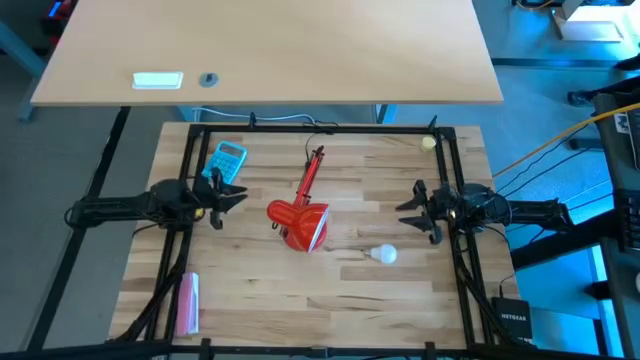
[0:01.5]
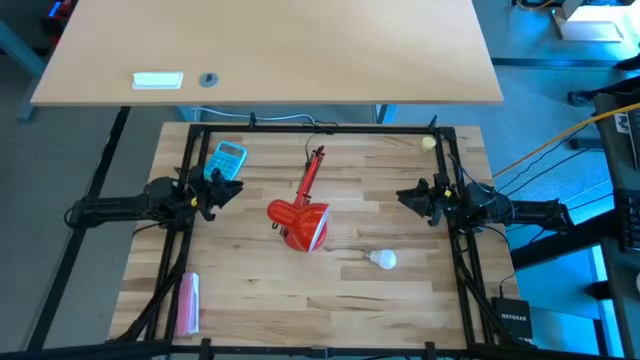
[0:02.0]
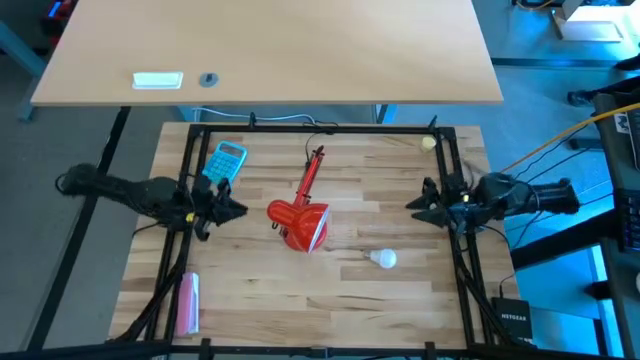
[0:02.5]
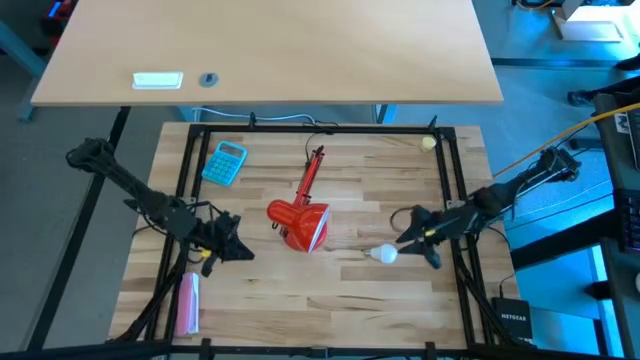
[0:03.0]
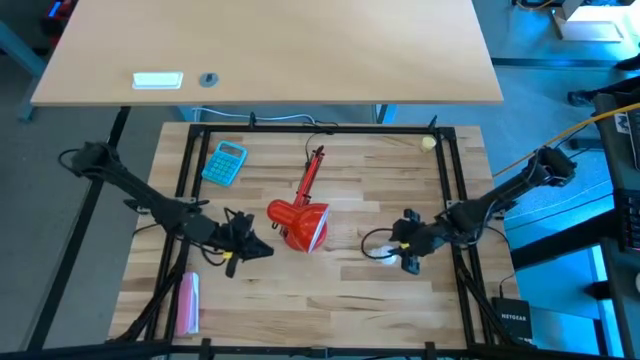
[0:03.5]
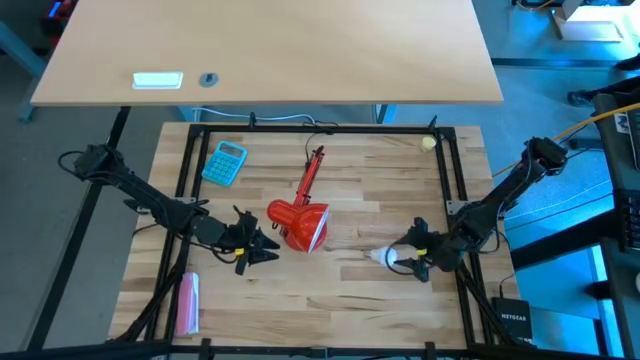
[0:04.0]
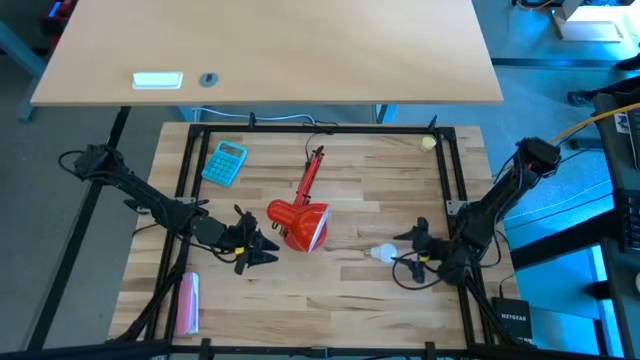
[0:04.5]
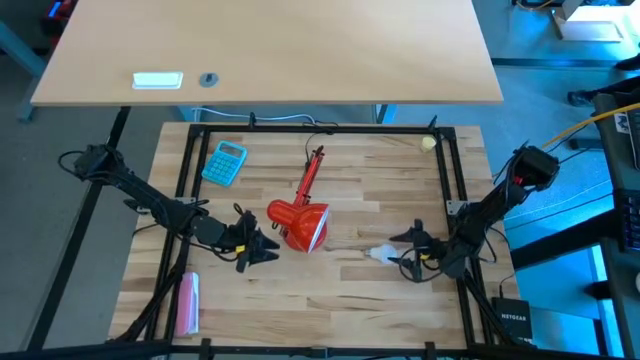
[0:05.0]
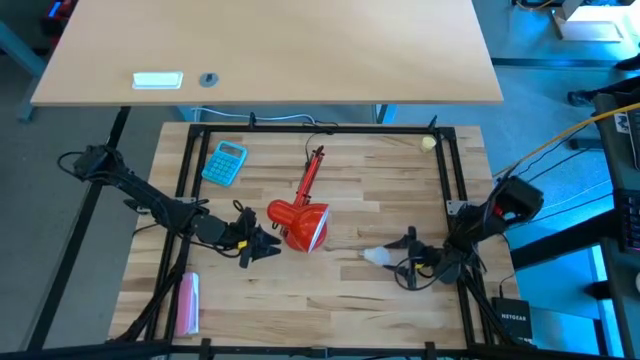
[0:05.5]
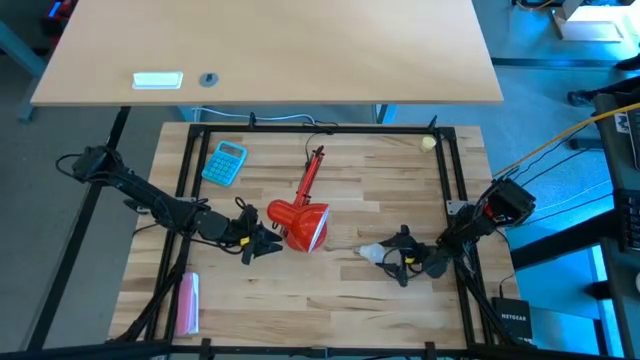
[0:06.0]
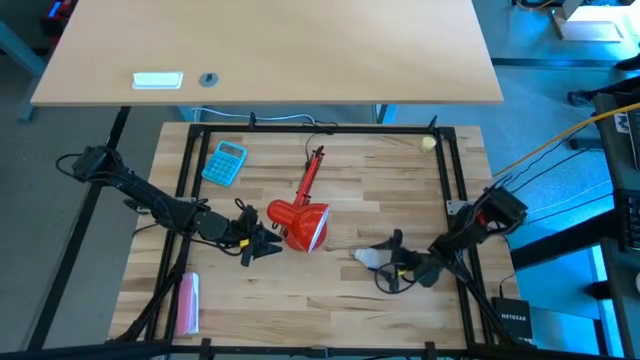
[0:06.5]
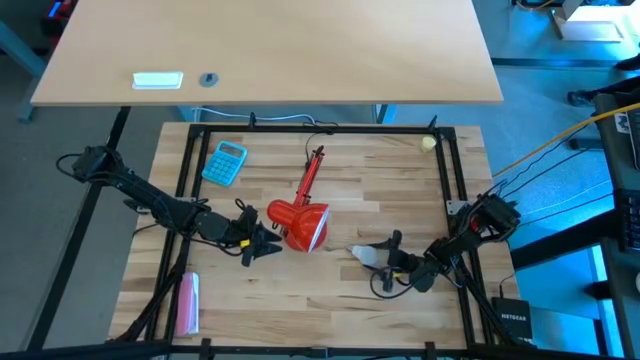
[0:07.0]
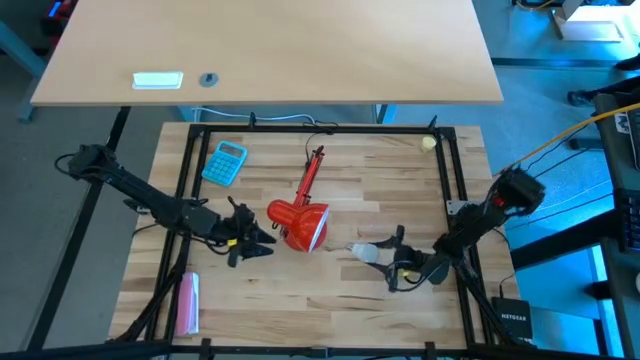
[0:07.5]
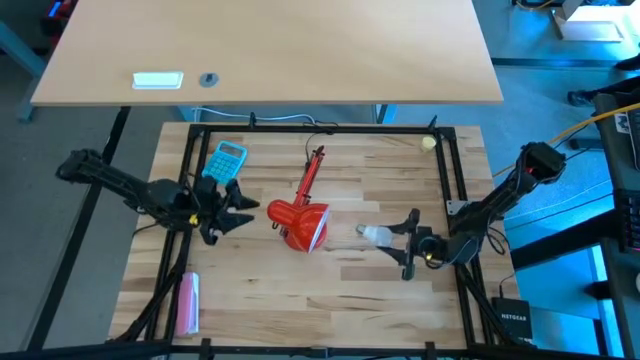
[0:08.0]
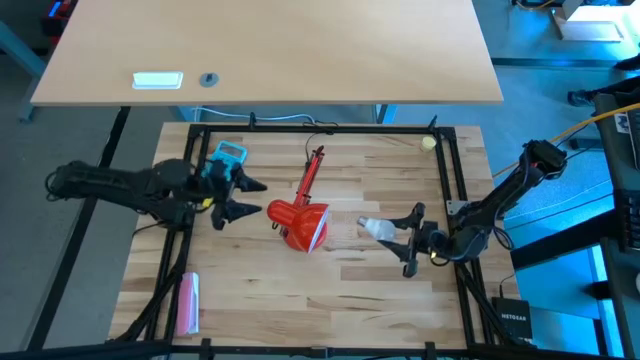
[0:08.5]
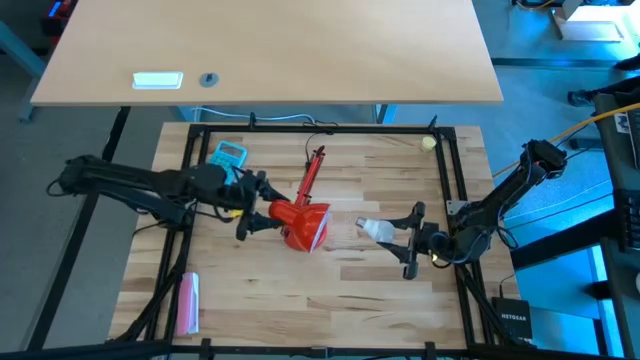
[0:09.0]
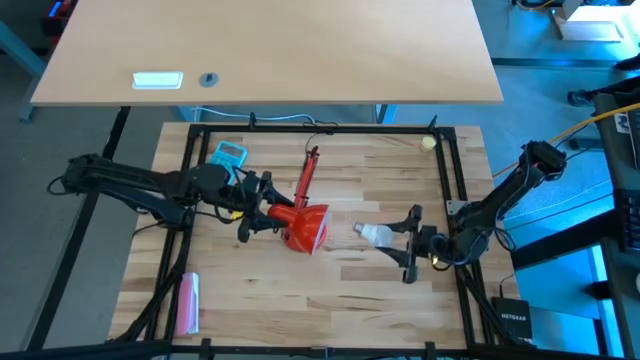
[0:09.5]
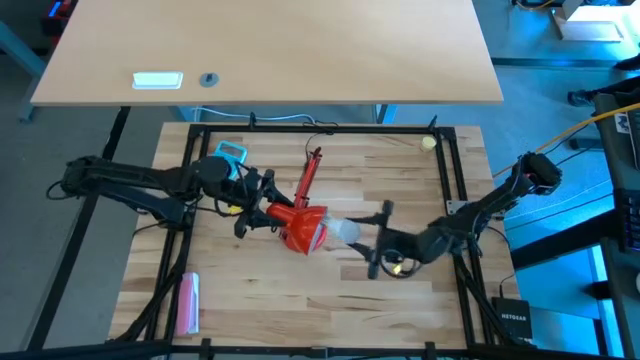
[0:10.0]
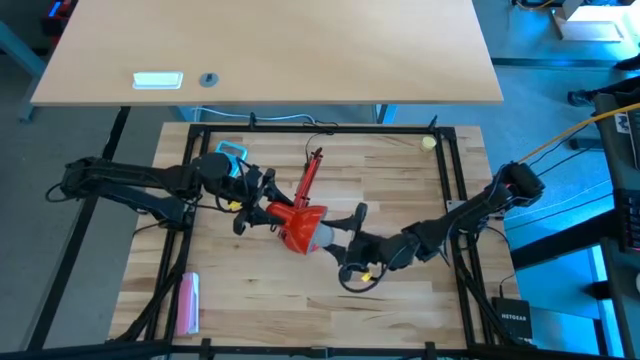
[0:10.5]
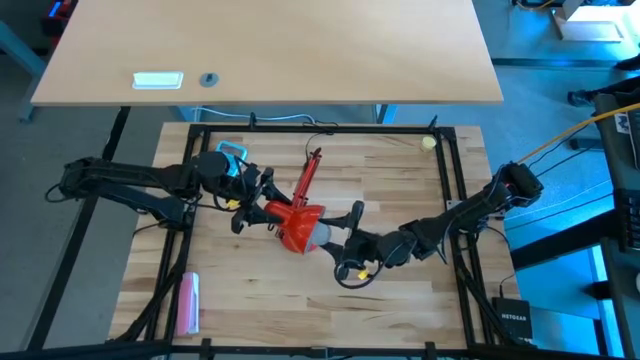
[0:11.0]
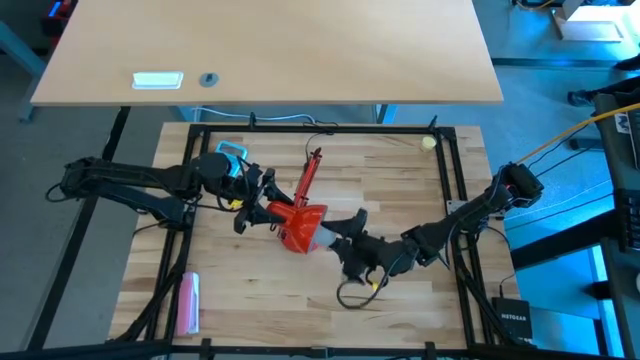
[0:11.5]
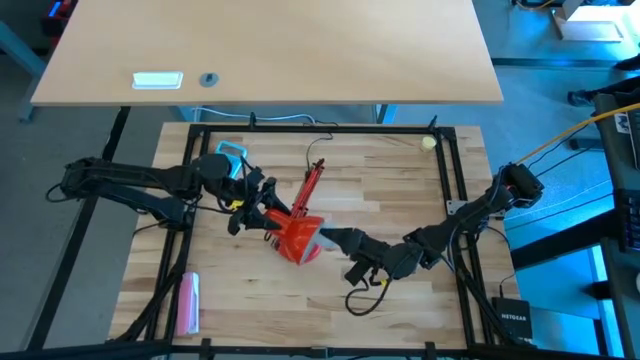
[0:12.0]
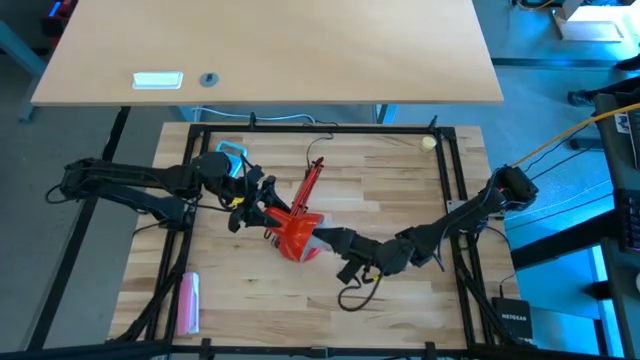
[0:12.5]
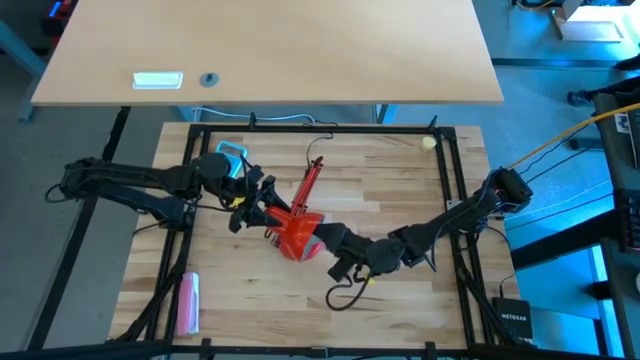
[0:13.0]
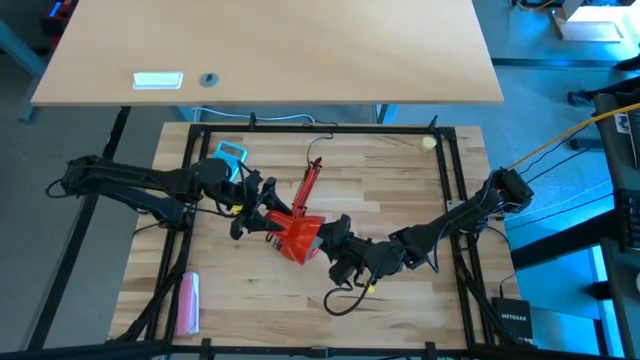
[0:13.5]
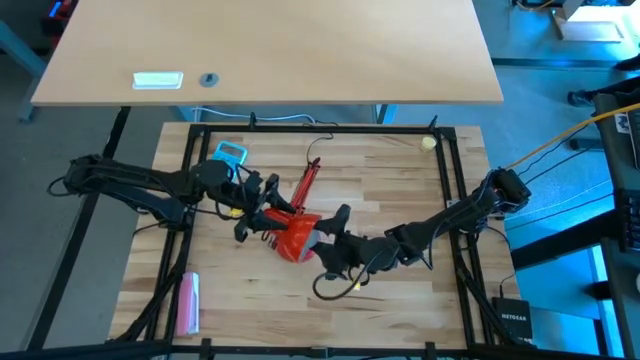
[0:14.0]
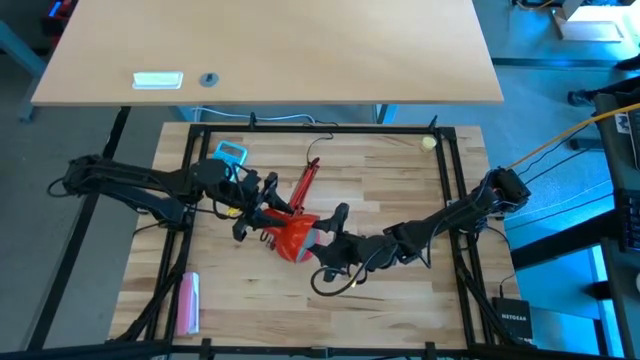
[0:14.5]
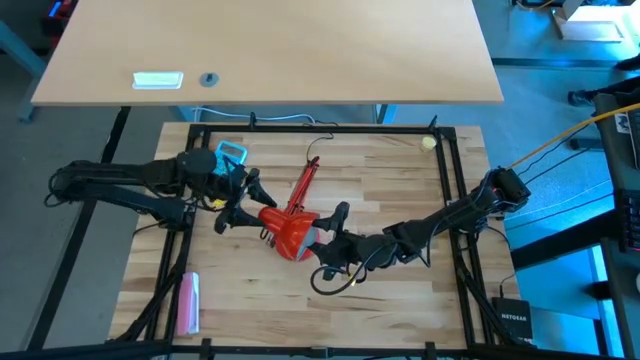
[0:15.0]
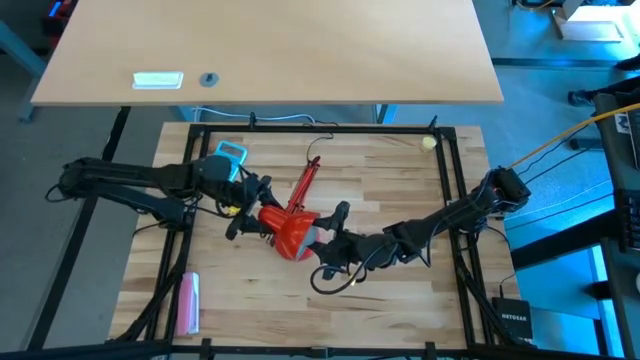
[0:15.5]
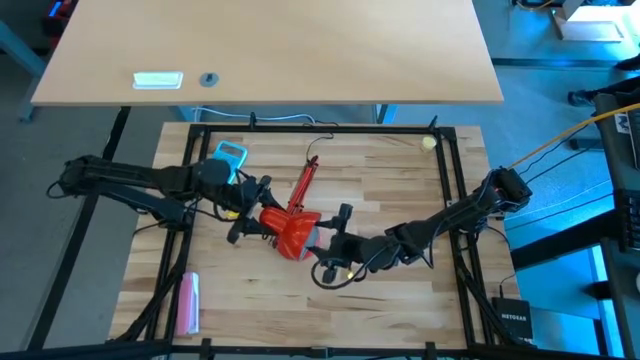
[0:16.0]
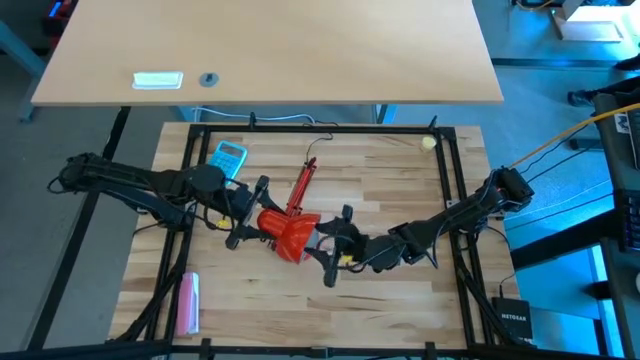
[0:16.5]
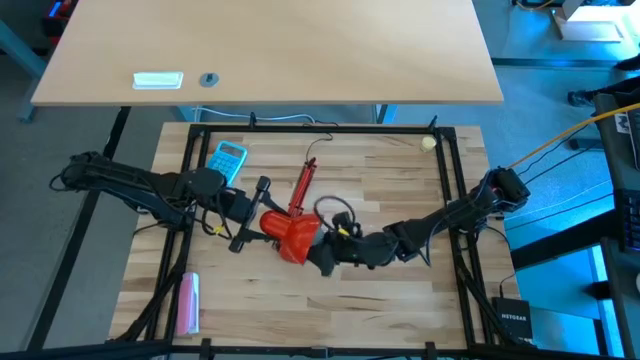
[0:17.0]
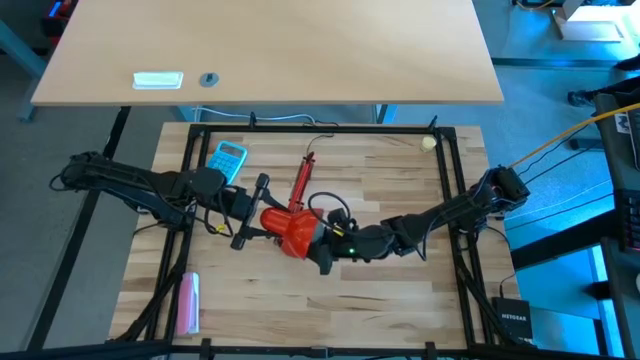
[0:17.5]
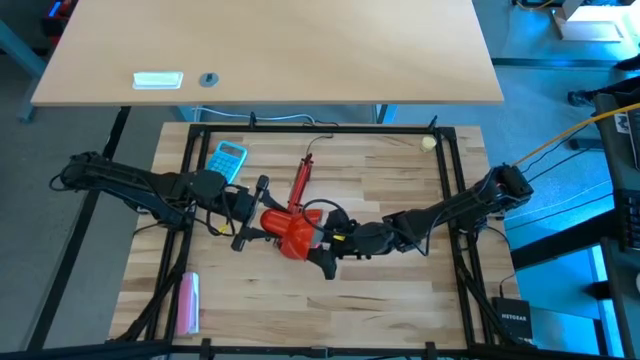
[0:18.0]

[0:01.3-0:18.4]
Task: Screw lightbulb
Insert the lightbulb into the lamp
